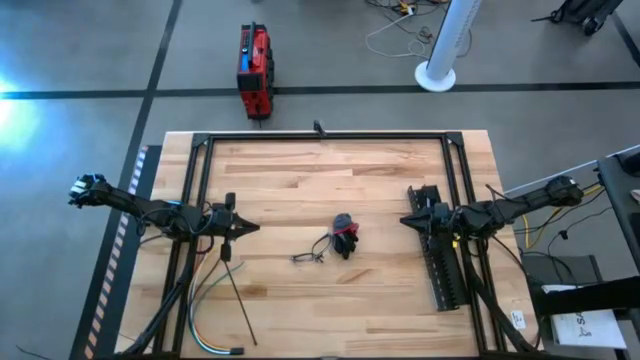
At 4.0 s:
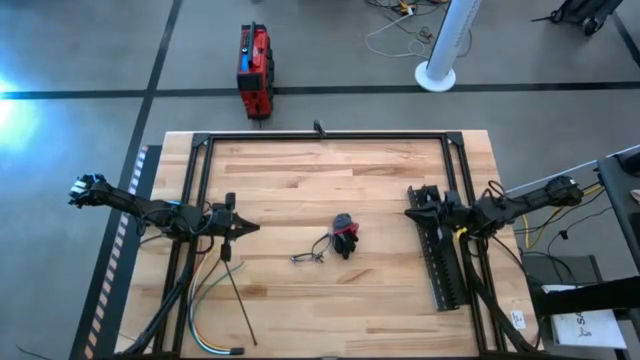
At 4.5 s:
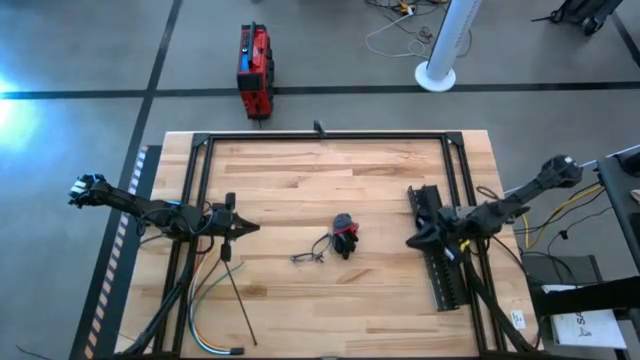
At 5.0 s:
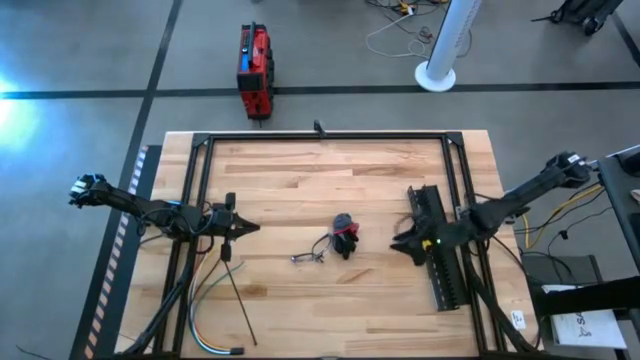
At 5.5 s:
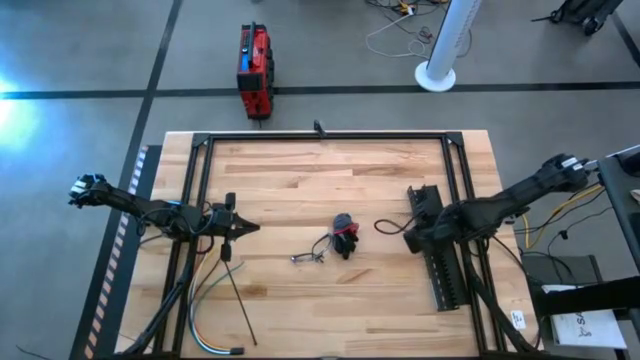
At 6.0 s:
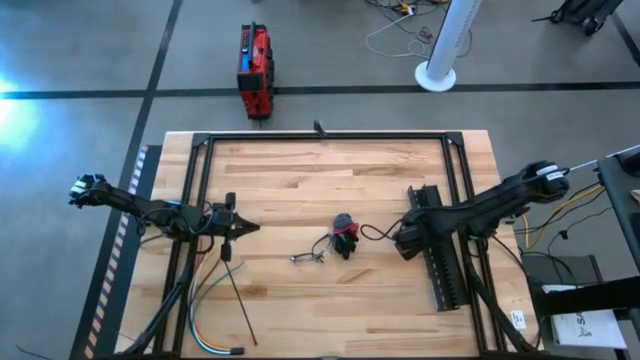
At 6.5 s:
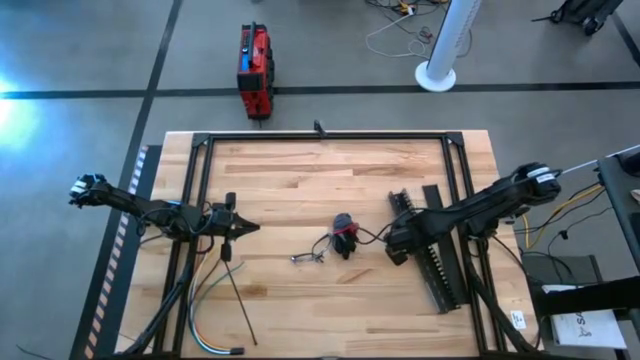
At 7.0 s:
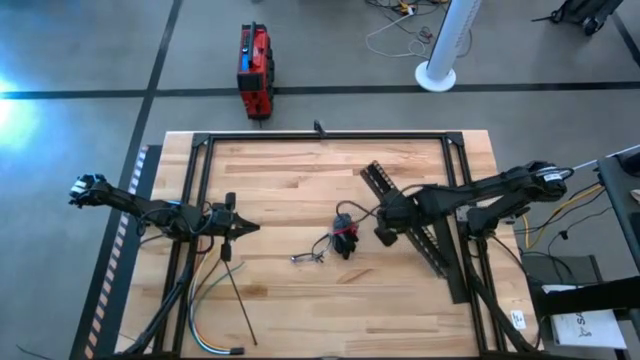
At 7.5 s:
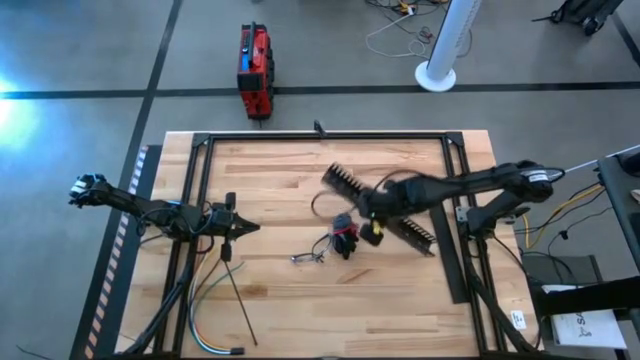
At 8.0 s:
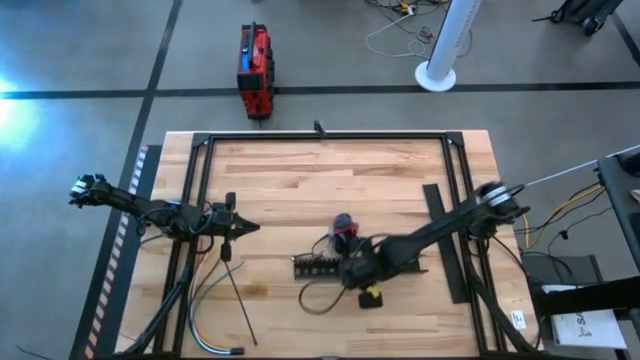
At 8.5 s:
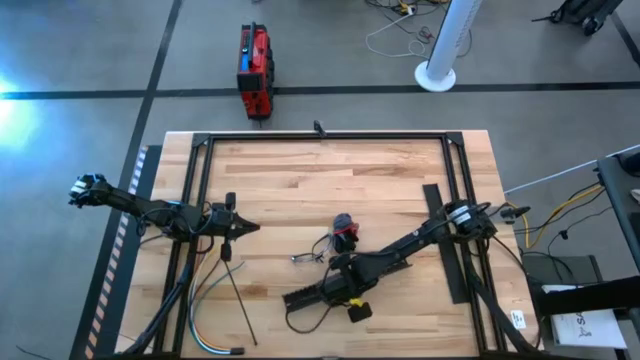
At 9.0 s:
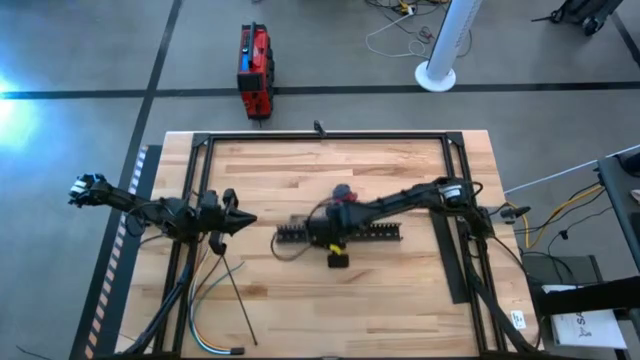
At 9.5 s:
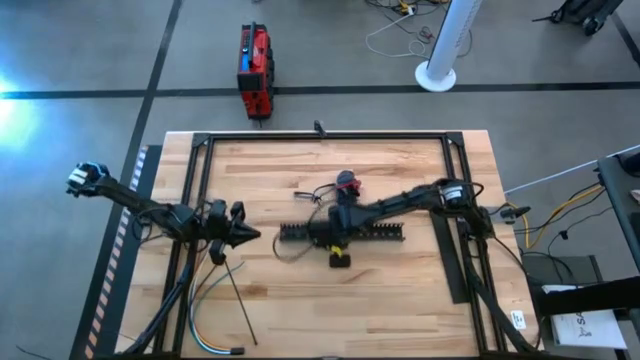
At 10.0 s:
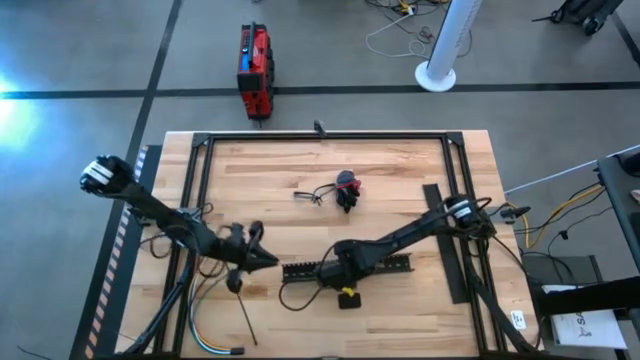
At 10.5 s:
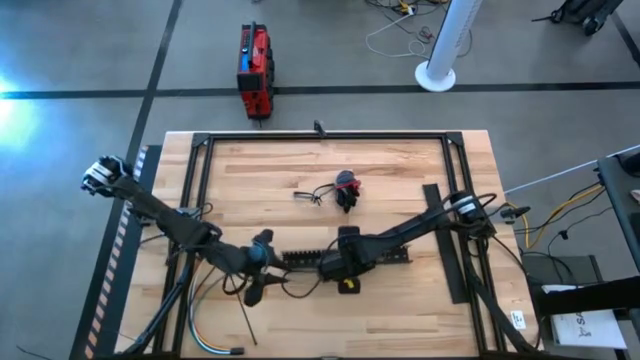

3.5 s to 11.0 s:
Task: Ziptie cables
Move the black cable duct to the center of the table

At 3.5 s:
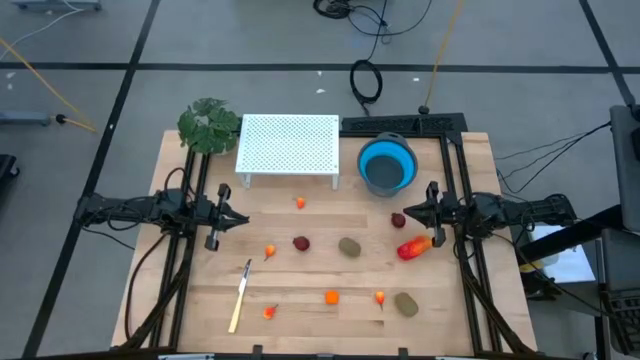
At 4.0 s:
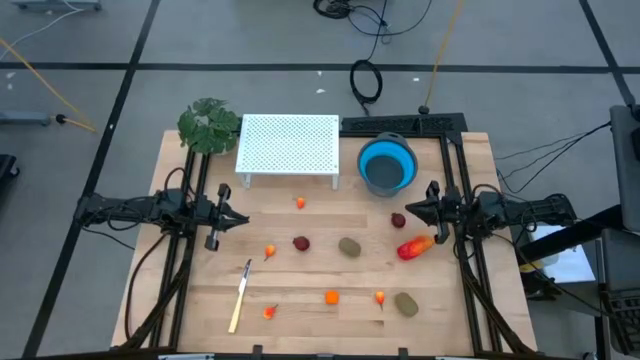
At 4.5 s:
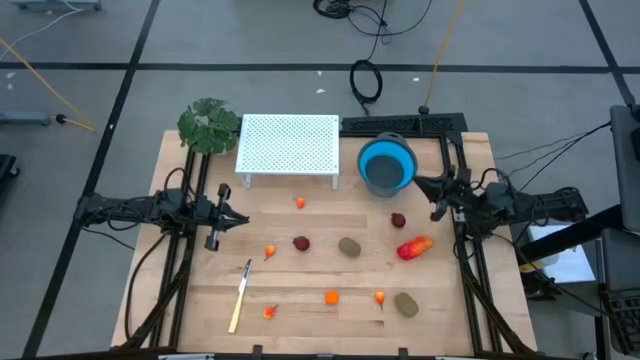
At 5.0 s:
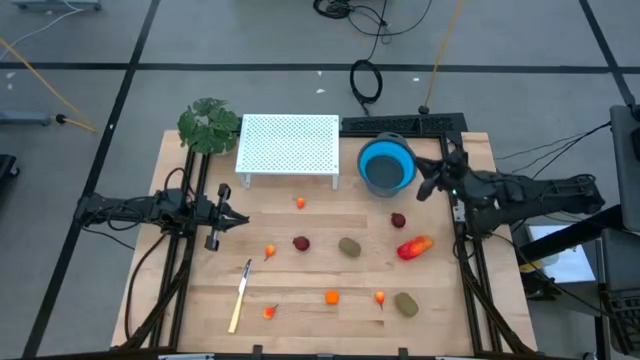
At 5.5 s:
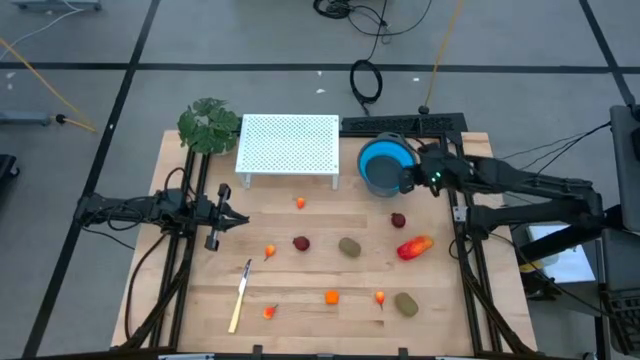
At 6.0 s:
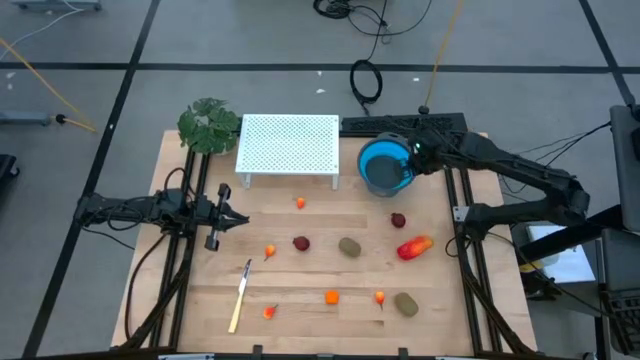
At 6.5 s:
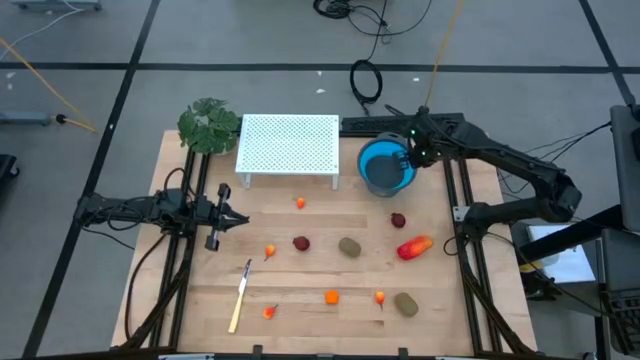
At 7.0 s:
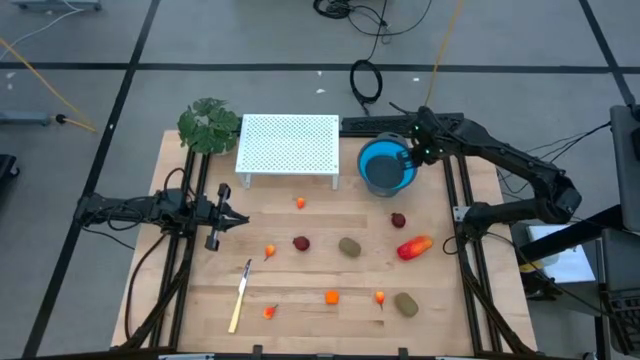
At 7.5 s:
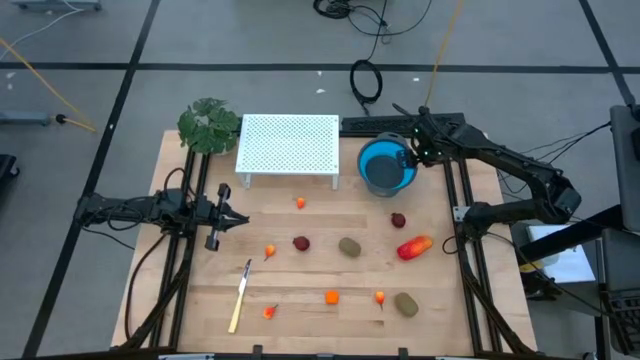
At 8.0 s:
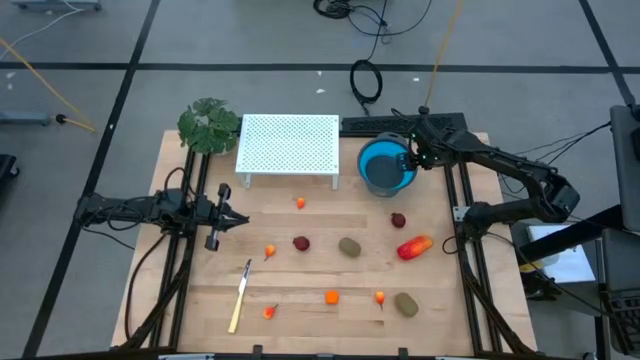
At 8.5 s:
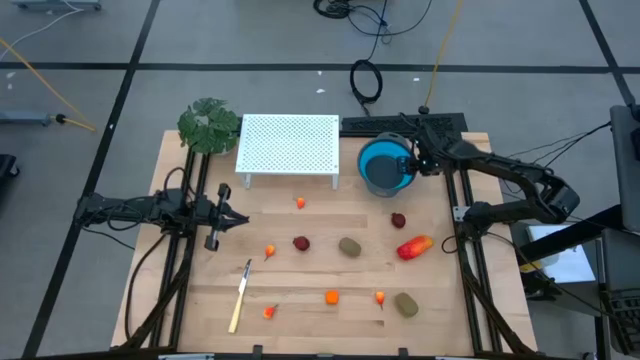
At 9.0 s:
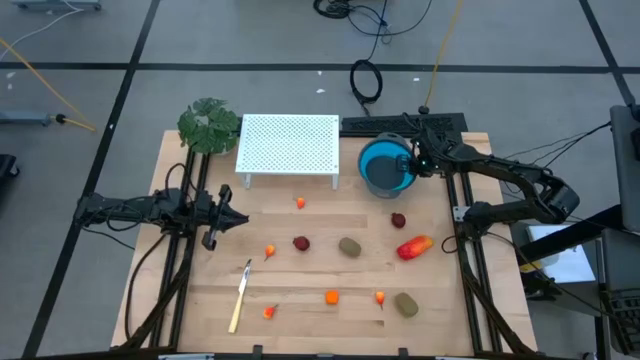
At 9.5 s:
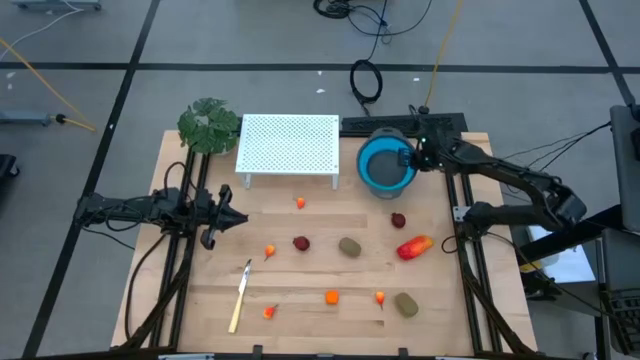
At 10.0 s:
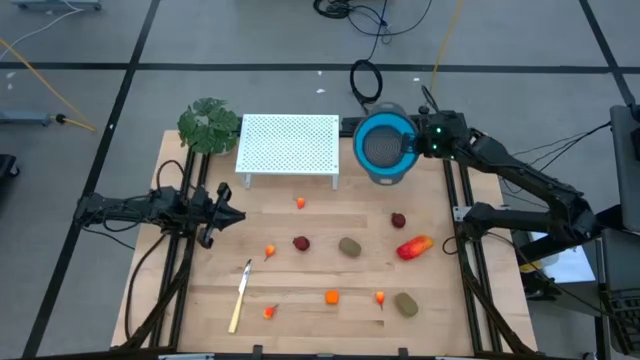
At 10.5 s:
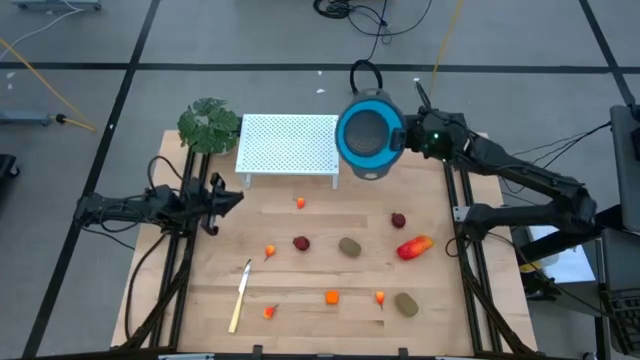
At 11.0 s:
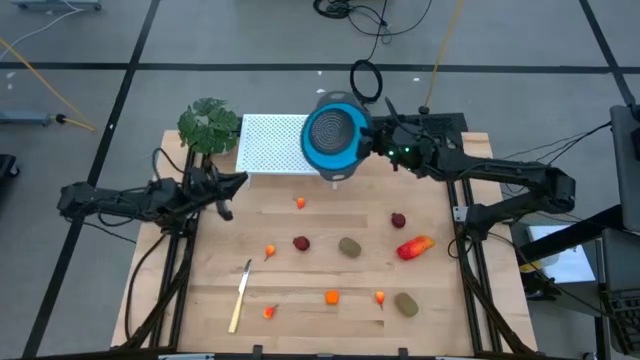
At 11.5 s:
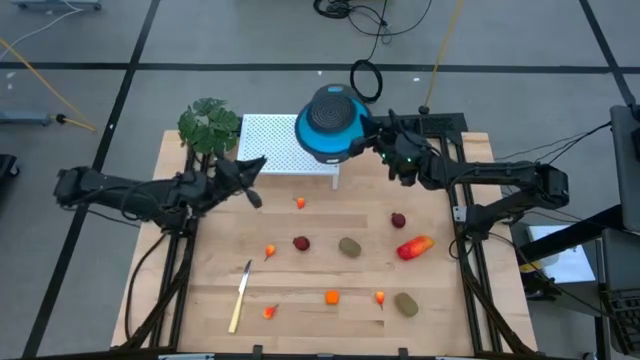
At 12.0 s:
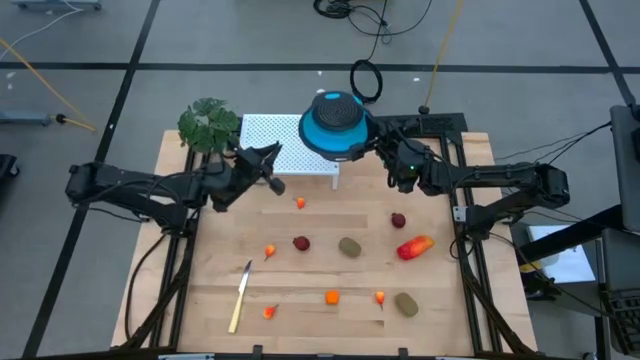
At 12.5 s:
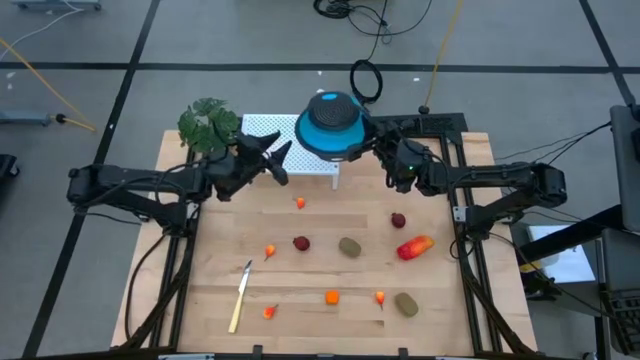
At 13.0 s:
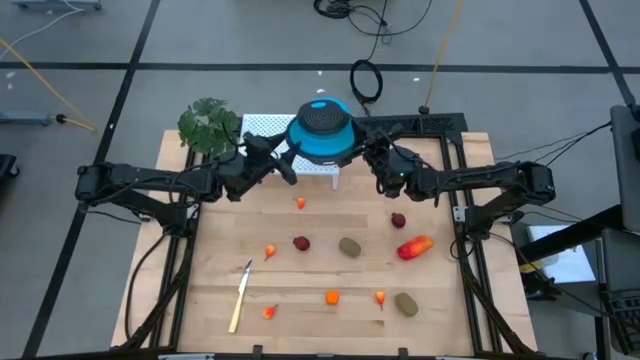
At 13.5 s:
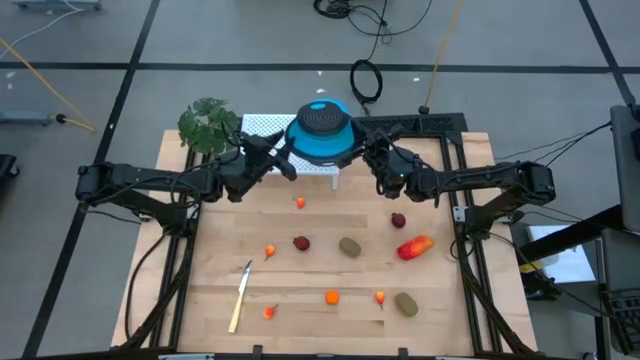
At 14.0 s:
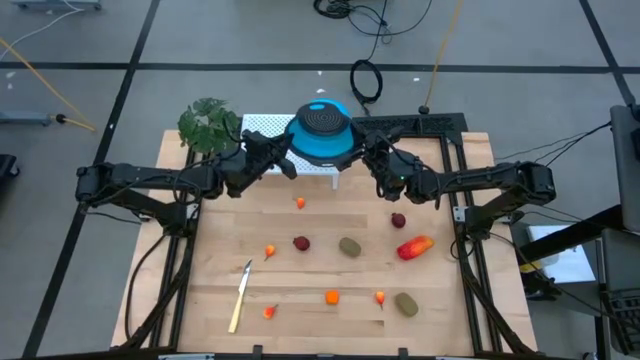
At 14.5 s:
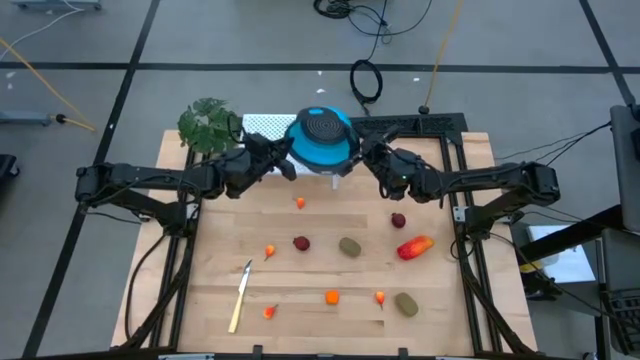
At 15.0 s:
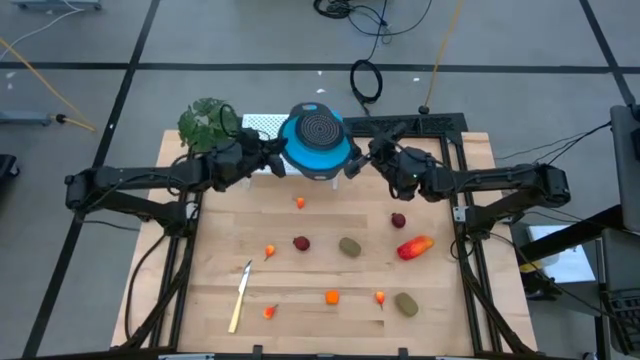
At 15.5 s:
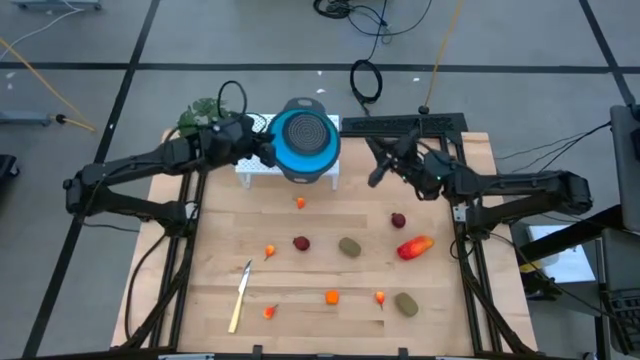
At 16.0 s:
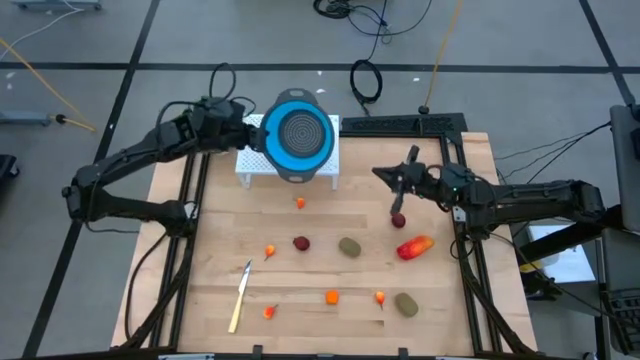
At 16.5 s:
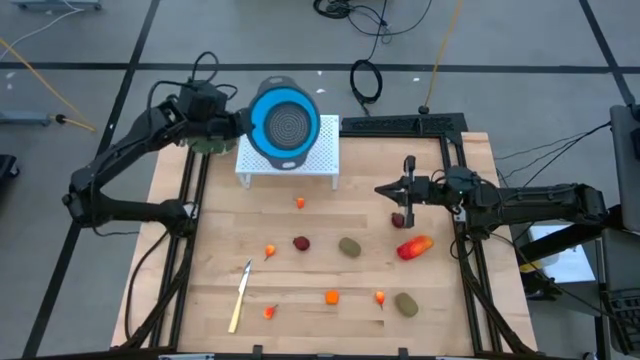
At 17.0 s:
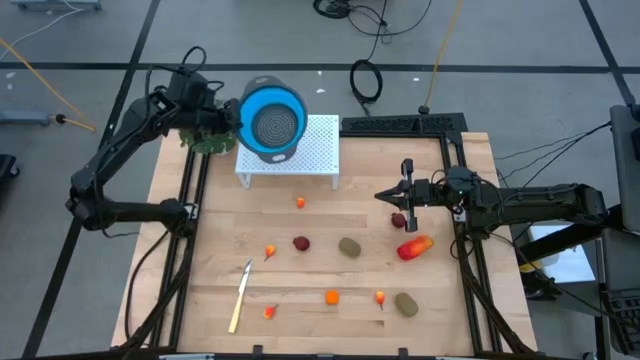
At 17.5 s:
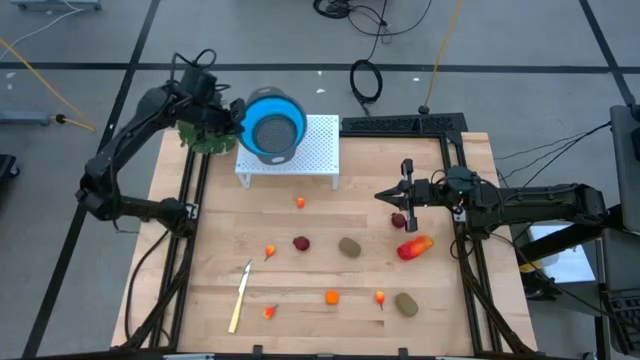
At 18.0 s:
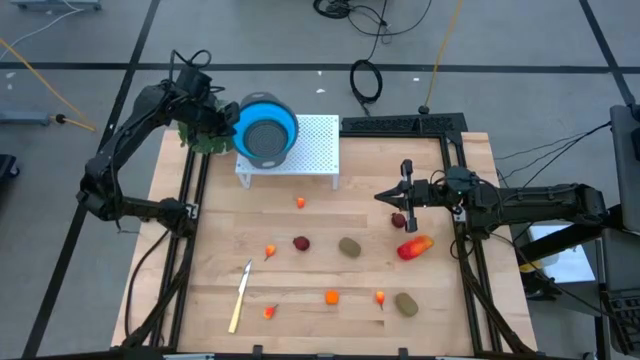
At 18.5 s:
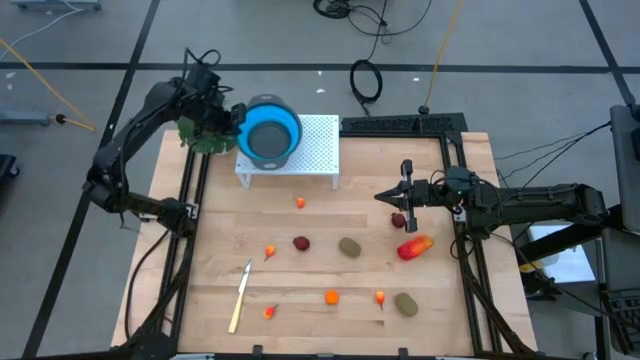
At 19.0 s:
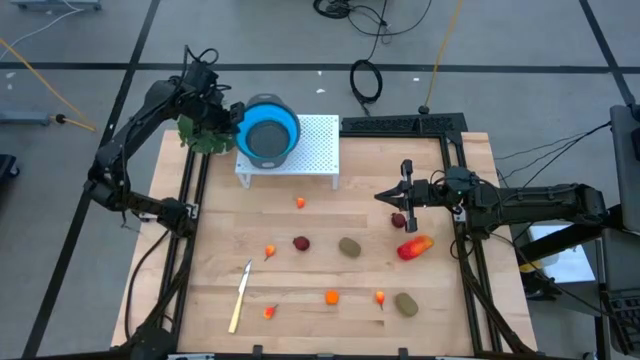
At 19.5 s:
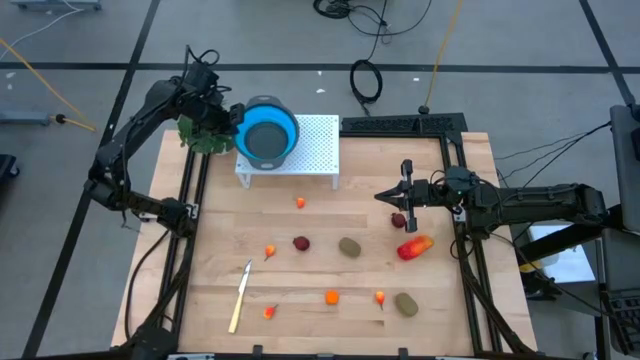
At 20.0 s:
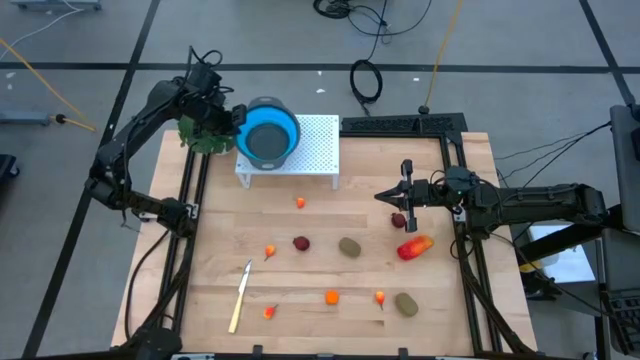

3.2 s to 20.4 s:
Task: Pick & Place Fruit
Put the blue strainer bowl on the shelf
